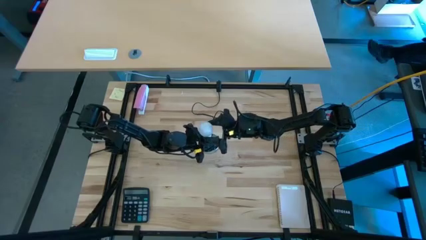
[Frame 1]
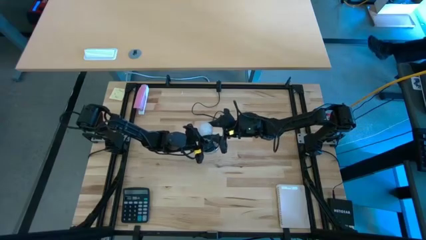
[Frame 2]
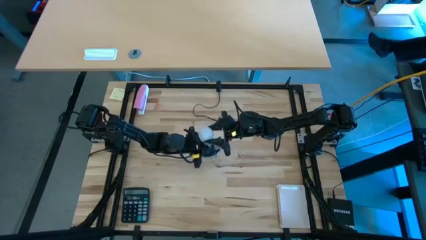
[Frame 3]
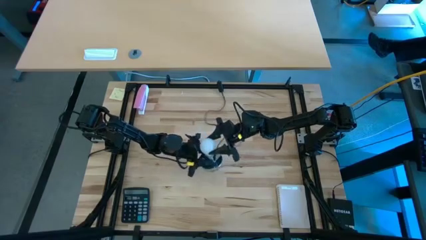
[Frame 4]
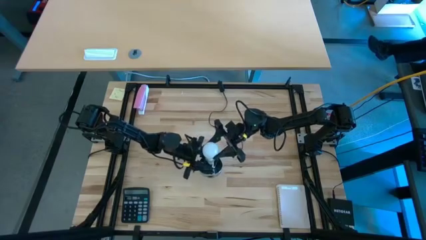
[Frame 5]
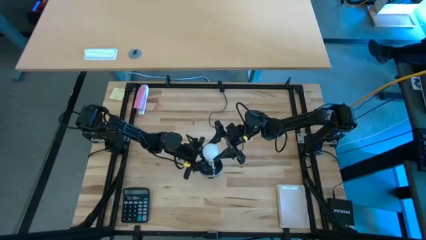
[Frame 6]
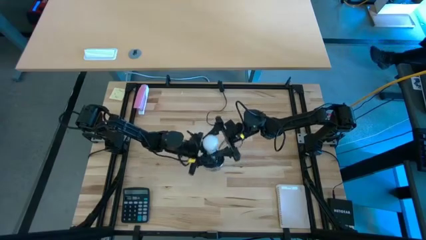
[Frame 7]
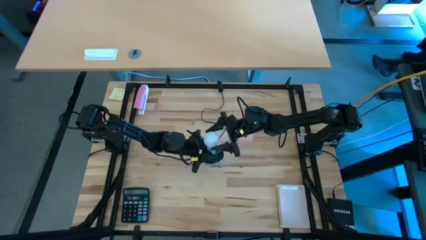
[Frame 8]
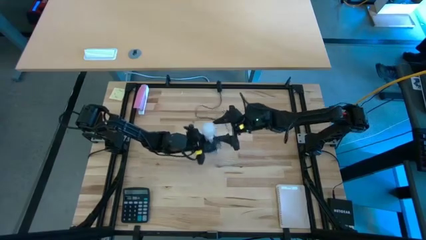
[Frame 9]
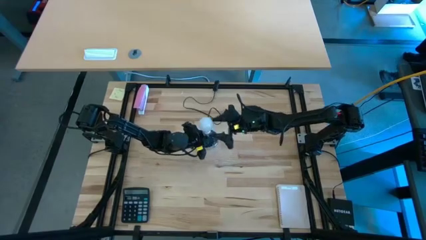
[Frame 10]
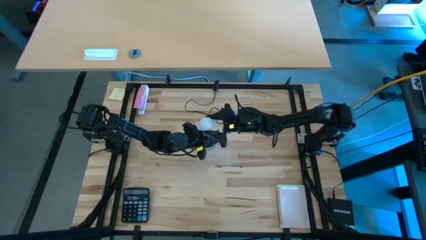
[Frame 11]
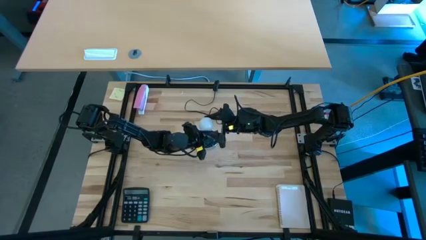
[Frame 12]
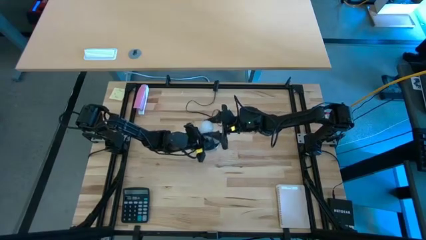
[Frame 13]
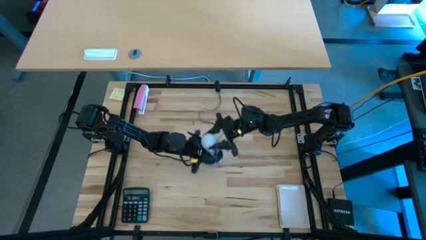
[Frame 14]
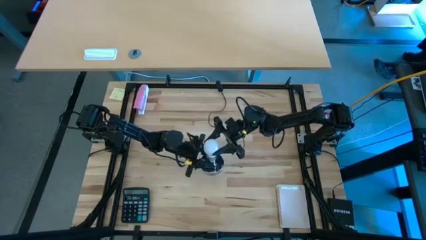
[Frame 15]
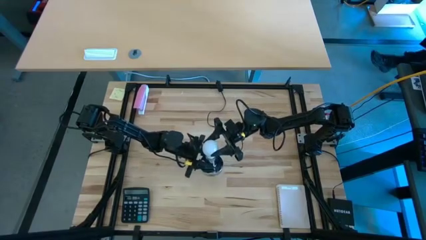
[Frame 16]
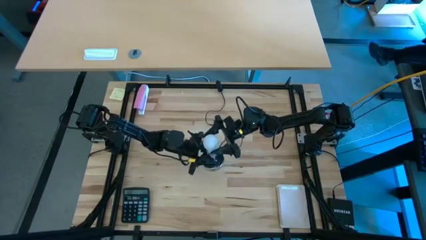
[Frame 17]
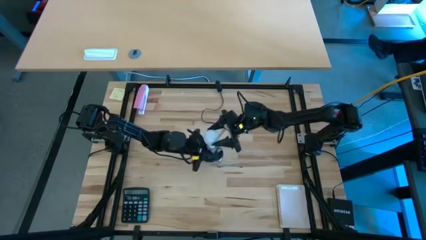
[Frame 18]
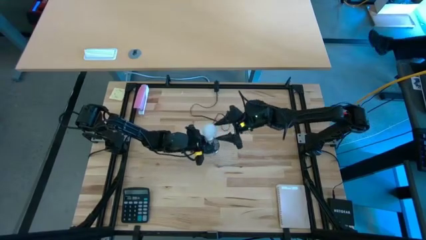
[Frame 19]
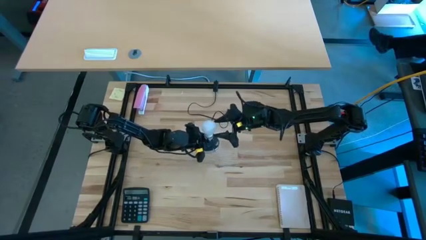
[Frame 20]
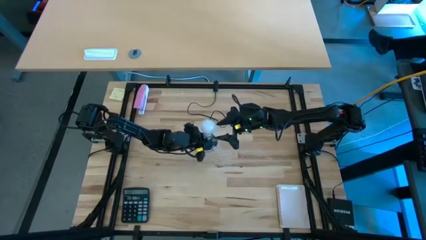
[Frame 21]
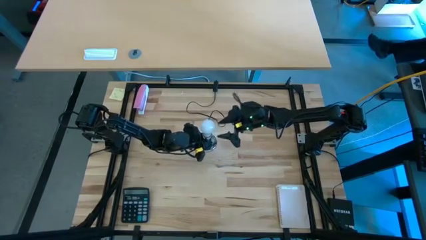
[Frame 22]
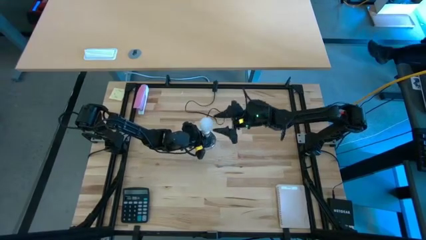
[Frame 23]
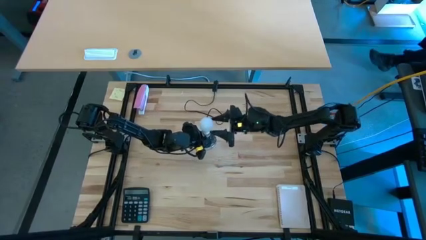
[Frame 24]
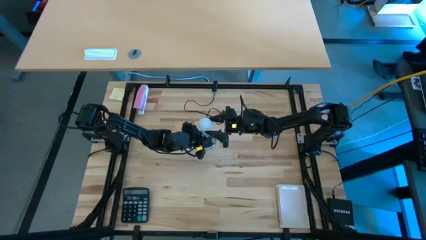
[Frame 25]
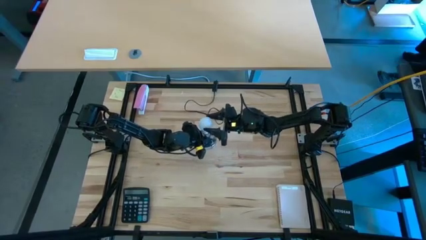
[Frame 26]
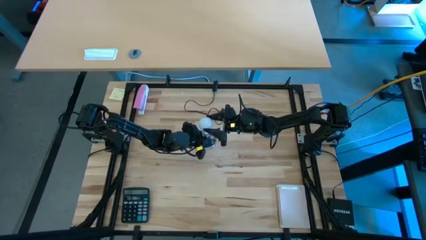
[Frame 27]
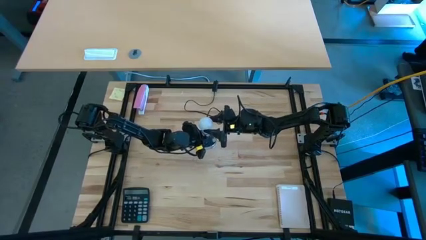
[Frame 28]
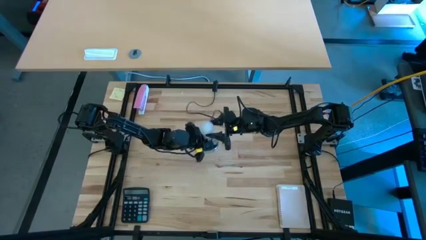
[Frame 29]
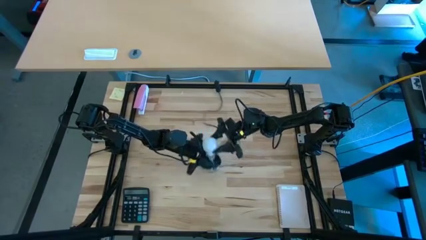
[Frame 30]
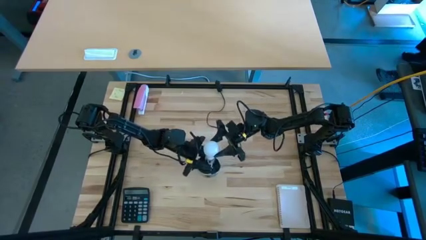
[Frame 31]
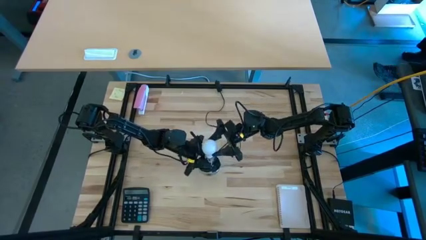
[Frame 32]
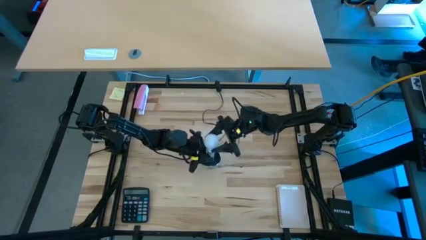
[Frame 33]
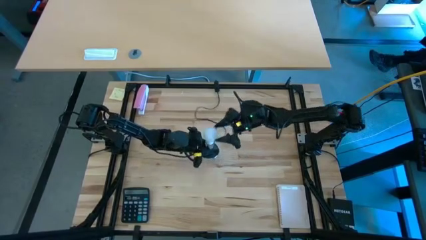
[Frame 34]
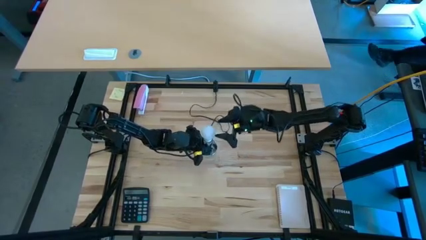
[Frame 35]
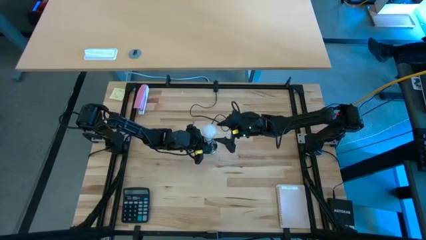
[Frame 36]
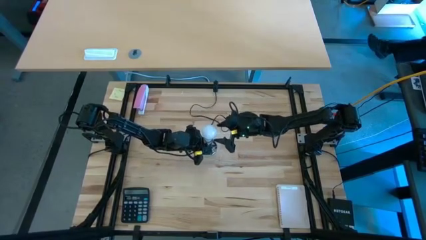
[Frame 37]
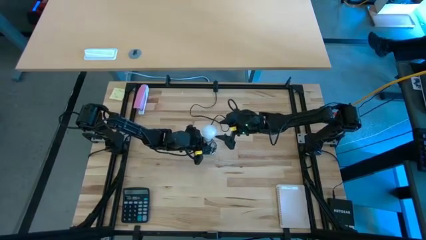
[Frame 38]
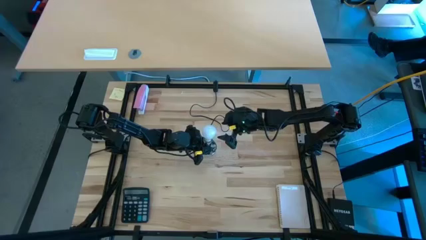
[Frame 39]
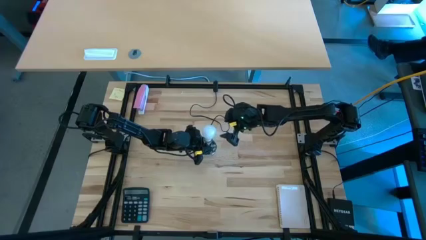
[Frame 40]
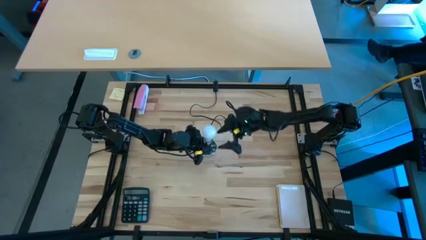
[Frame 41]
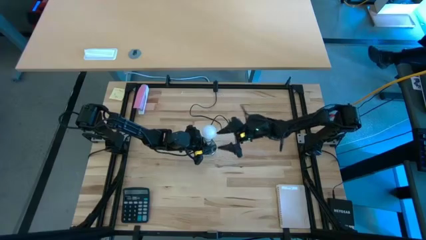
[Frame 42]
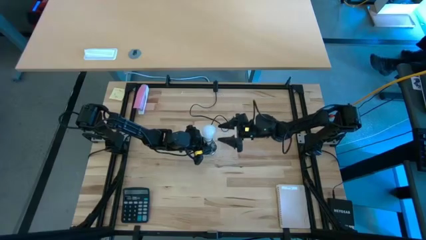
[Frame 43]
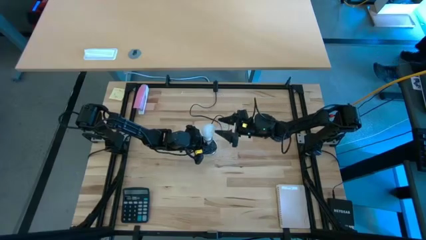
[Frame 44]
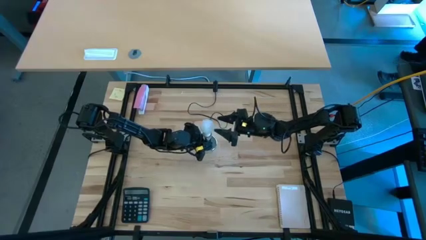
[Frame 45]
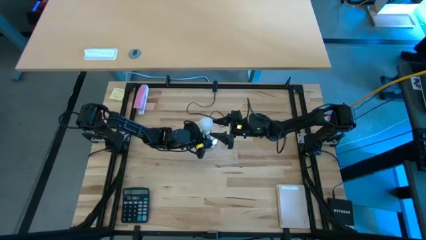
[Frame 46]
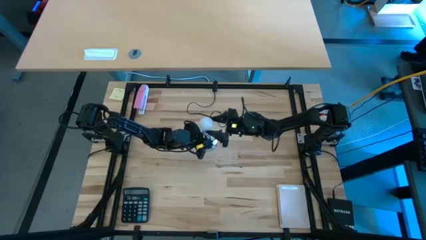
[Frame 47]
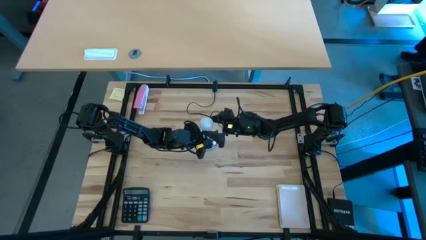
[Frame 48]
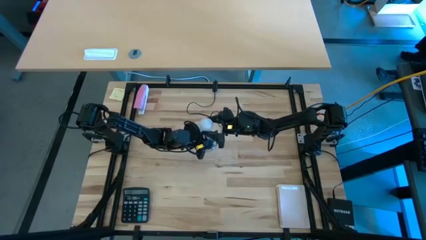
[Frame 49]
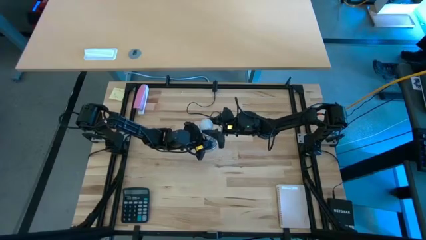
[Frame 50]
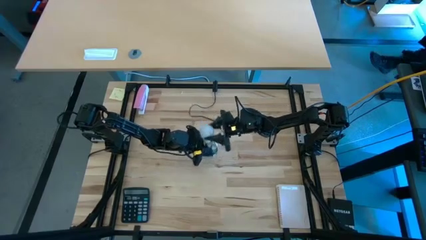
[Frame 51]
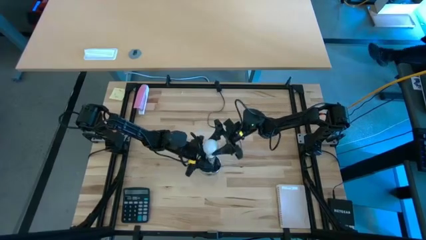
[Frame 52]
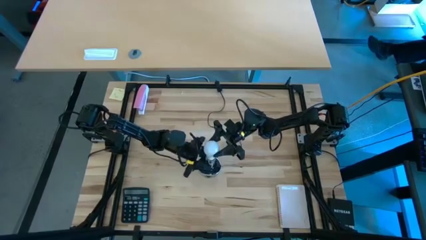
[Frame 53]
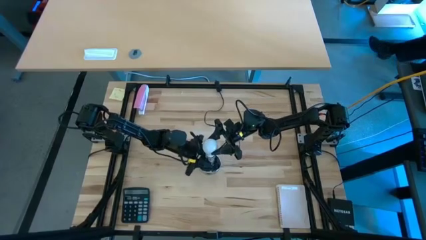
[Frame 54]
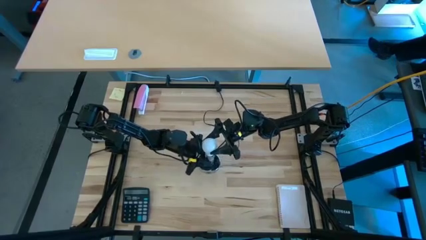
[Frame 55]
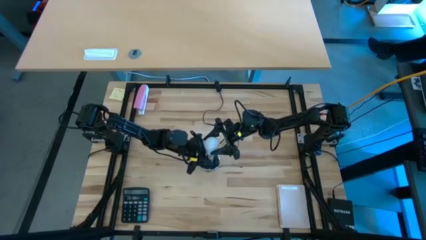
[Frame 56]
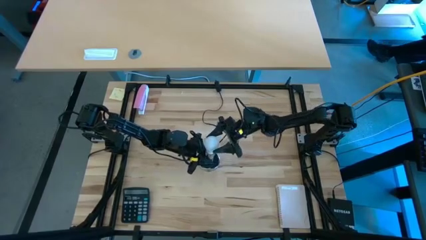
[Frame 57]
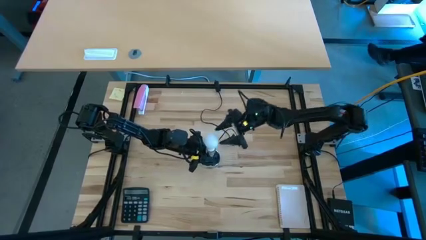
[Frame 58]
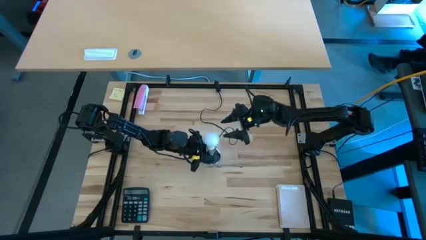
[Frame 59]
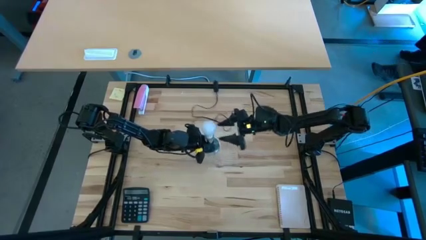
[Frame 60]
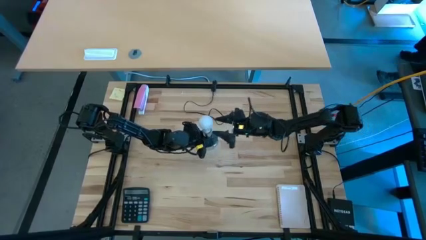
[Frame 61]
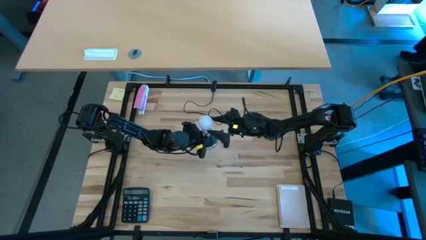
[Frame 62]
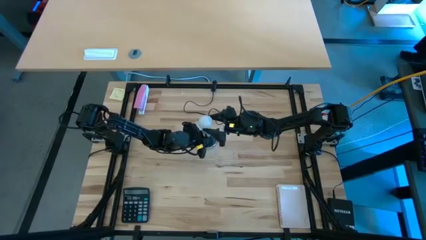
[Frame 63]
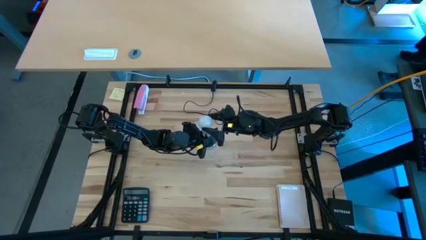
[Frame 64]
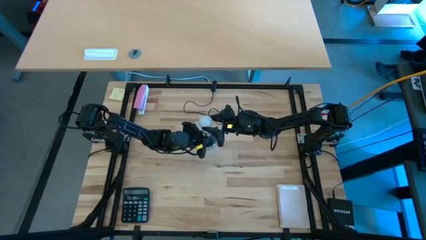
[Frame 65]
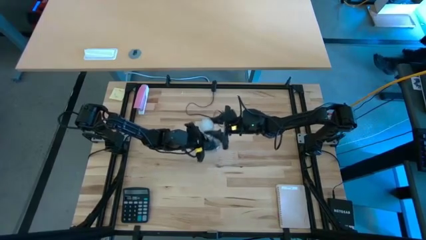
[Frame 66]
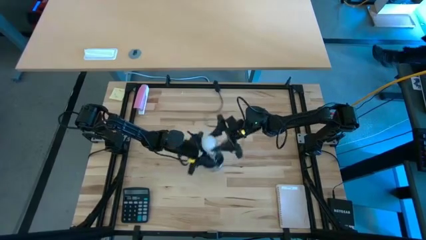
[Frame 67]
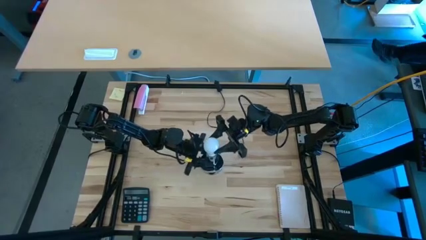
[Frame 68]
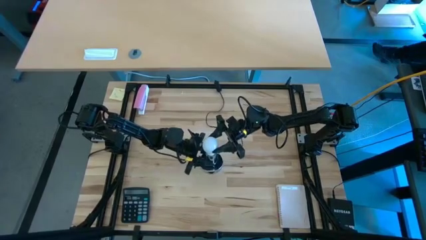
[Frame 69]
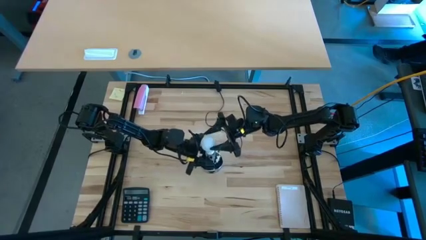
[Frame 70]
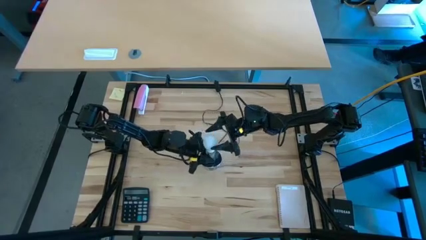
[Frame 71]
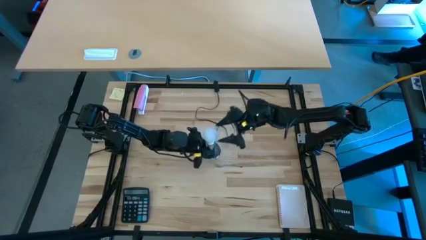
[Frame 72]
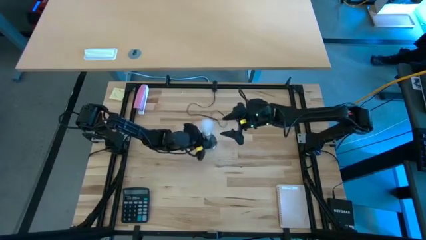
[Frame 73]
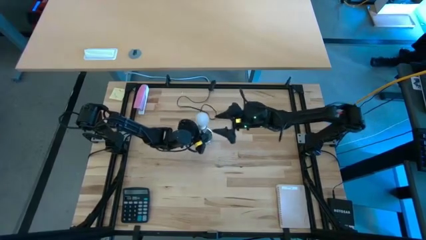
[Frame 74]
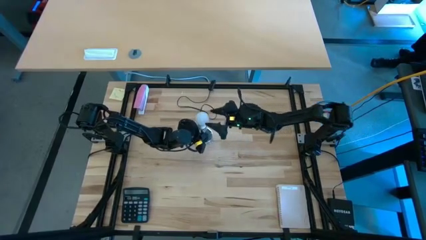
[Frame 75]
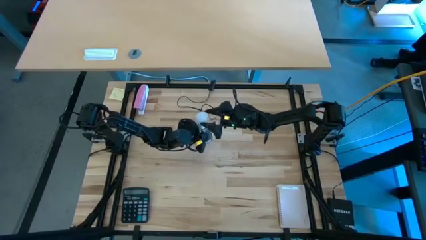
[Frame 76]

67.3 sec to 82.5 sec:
Task: Screw lightbulb
Remove the lightbulb from the lamp

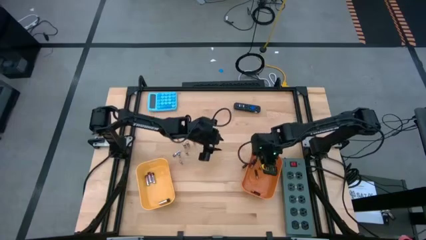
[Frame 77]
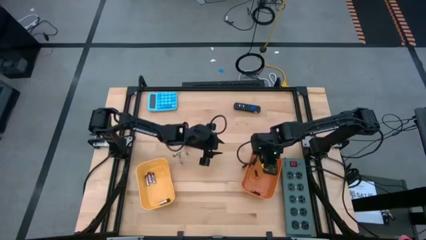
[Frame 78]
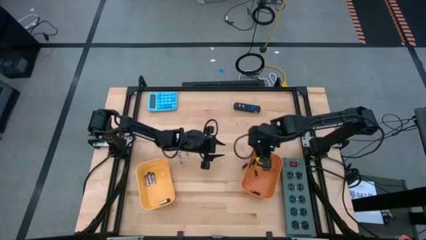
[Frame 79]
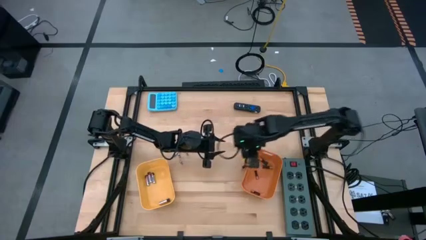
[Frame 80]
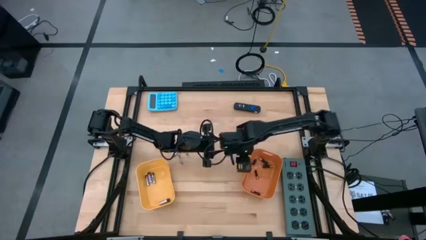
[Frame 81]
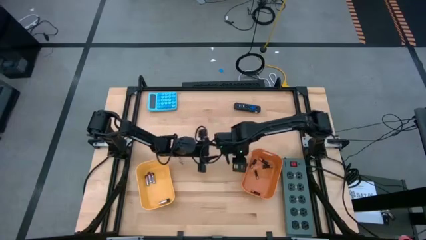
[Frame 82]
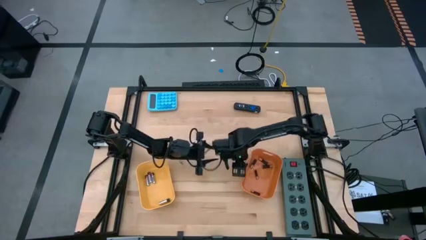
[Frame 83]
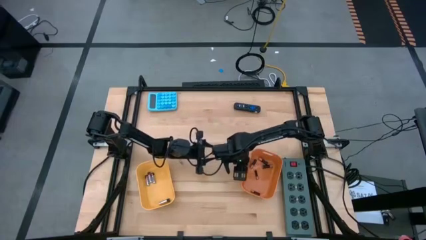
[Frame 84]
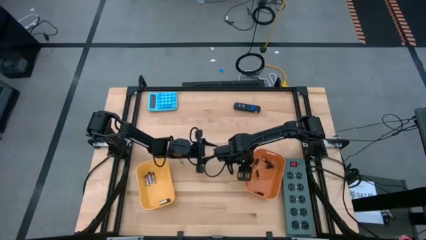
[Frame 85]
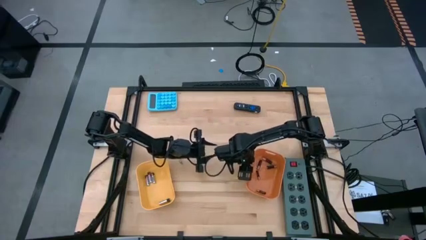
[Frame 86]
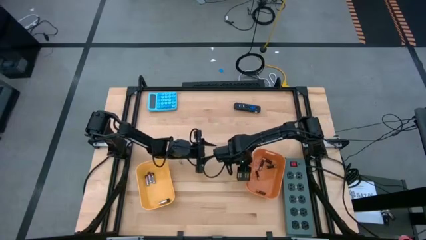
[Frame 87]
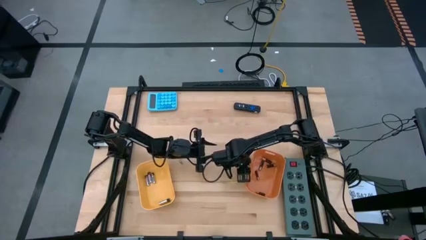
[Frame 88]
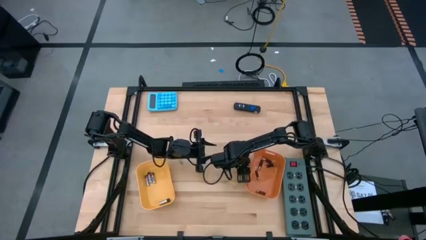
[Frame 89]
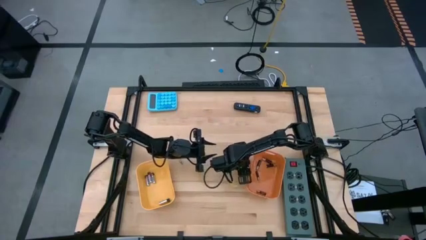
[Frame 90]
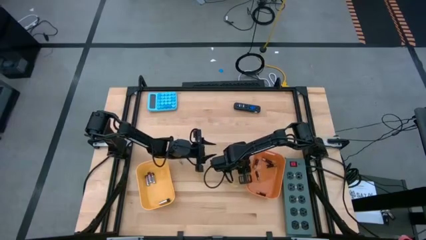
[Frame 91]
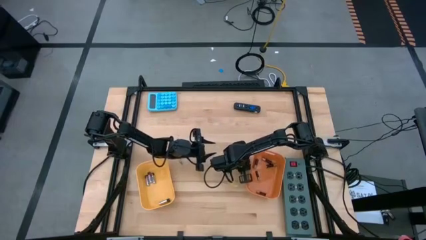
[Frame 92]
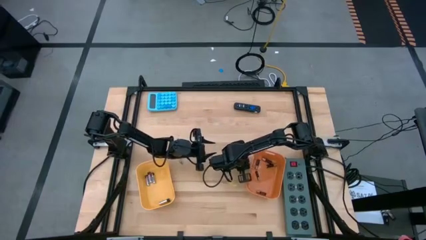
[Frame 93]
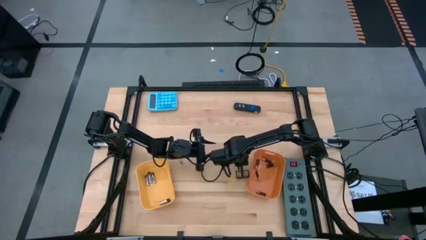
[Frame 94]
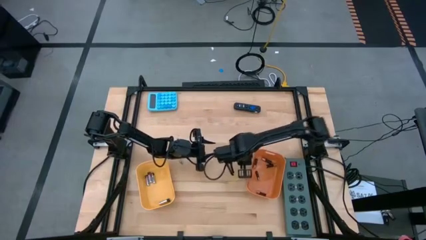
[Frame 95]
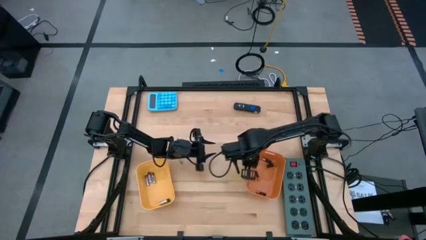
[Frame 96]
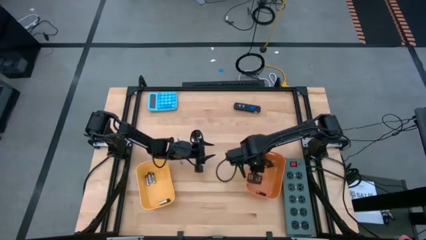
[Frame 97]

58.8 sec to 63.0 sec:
Task: Sort batteries
Put the brown battery into the orange bin
